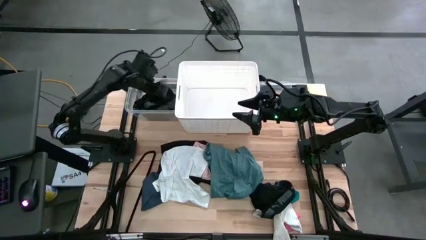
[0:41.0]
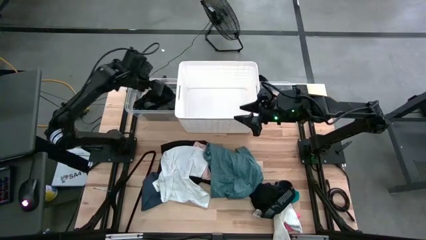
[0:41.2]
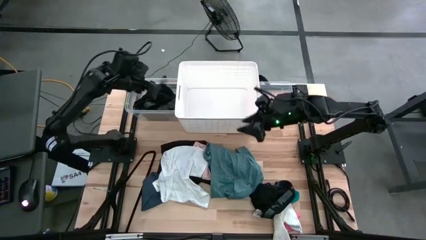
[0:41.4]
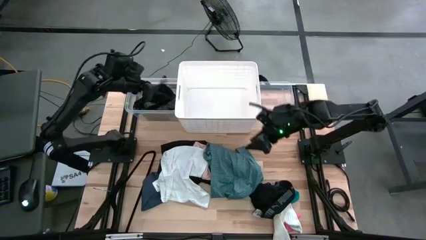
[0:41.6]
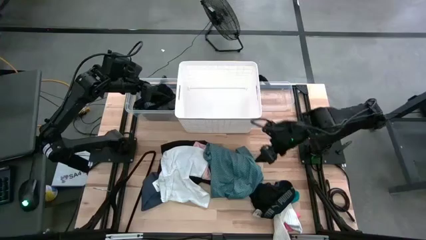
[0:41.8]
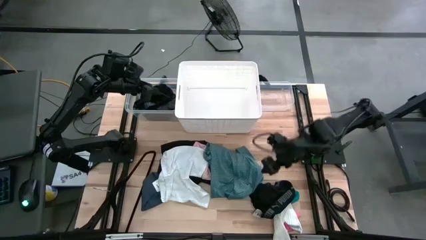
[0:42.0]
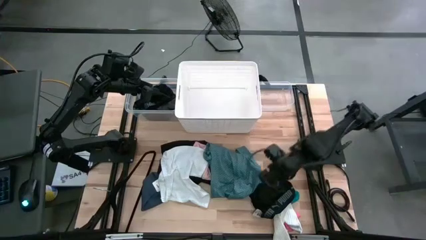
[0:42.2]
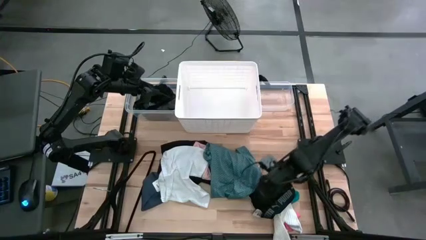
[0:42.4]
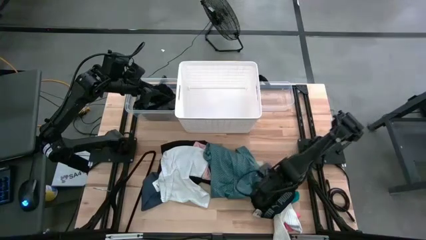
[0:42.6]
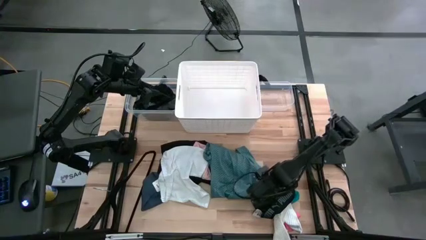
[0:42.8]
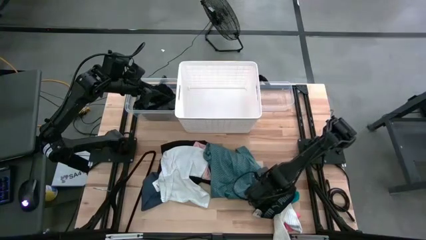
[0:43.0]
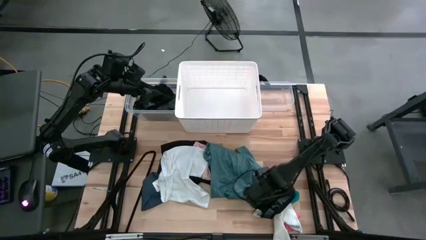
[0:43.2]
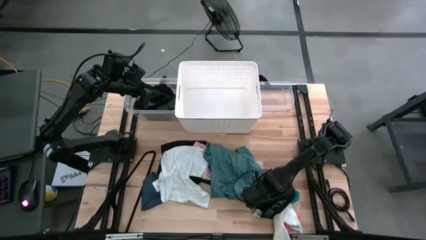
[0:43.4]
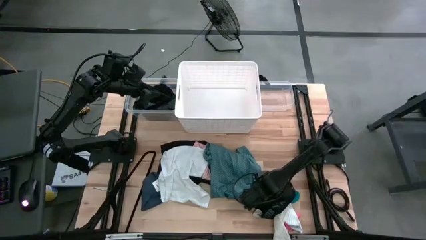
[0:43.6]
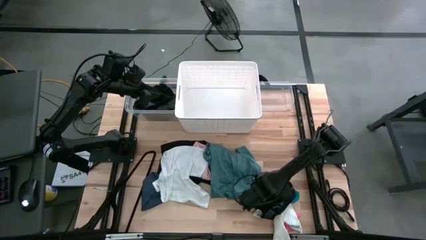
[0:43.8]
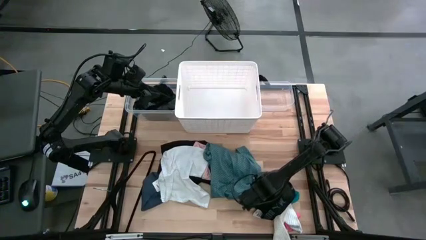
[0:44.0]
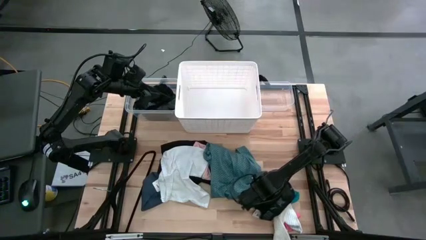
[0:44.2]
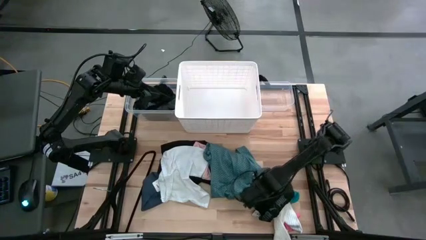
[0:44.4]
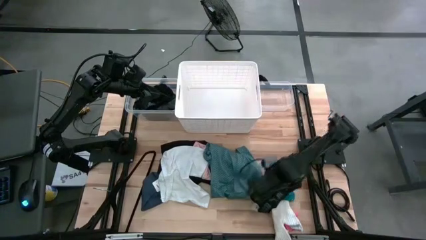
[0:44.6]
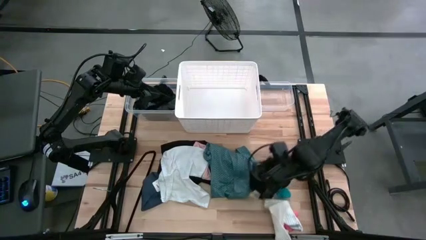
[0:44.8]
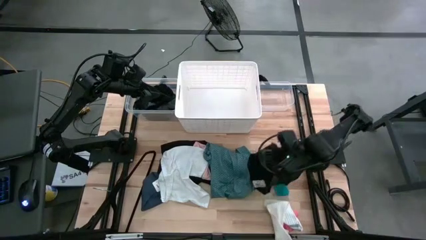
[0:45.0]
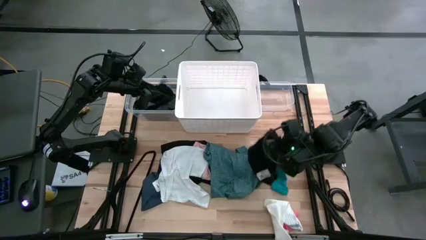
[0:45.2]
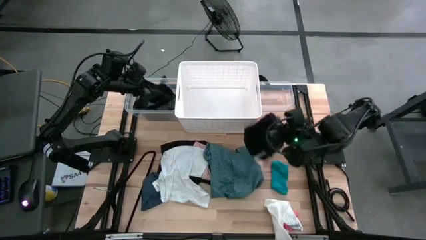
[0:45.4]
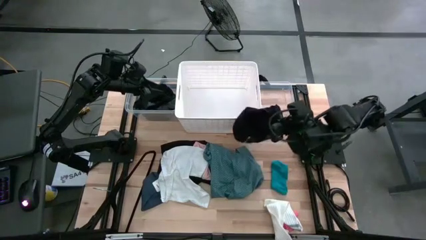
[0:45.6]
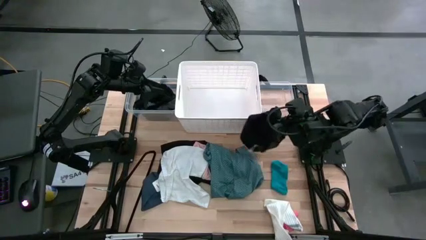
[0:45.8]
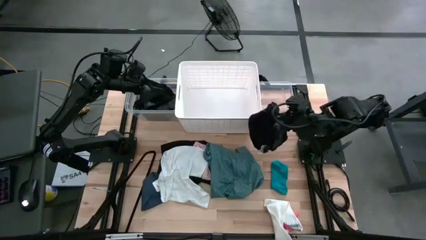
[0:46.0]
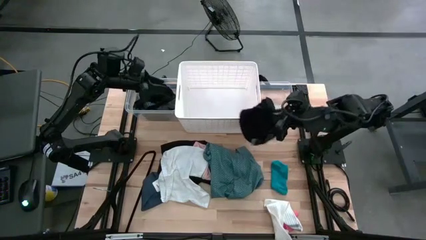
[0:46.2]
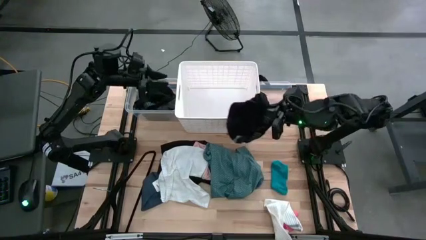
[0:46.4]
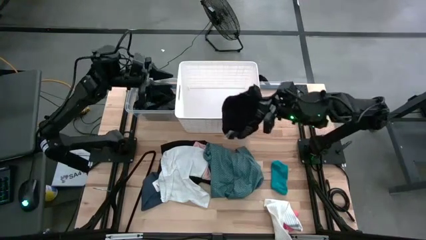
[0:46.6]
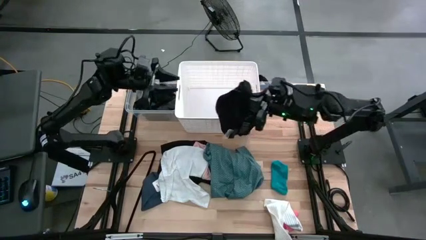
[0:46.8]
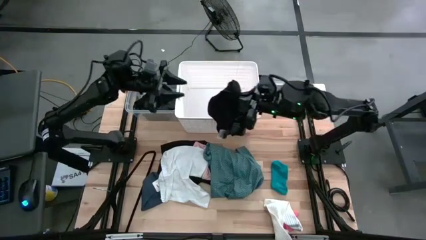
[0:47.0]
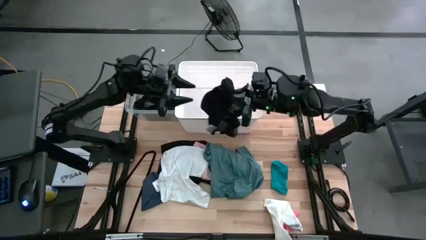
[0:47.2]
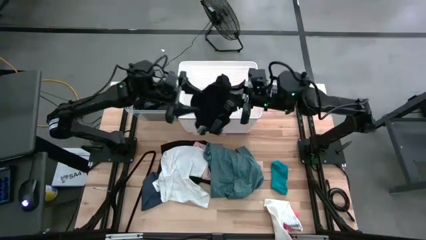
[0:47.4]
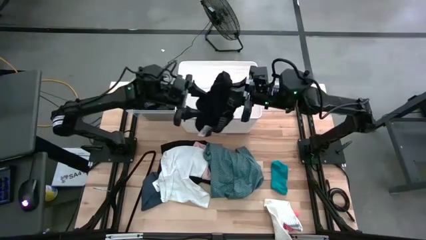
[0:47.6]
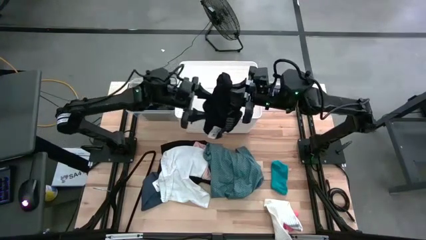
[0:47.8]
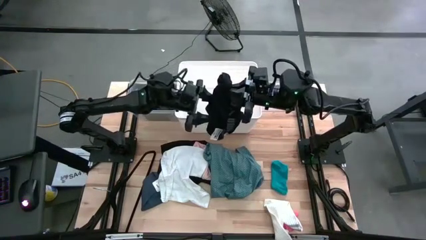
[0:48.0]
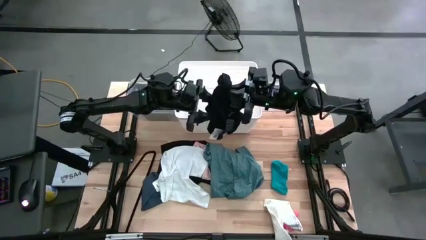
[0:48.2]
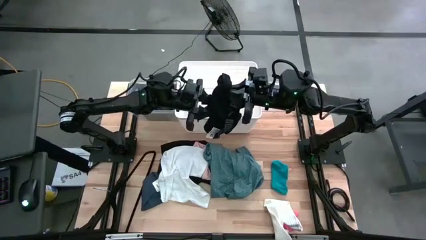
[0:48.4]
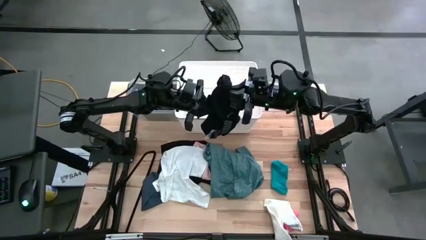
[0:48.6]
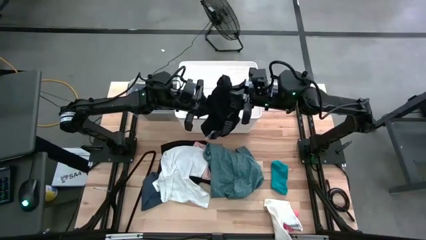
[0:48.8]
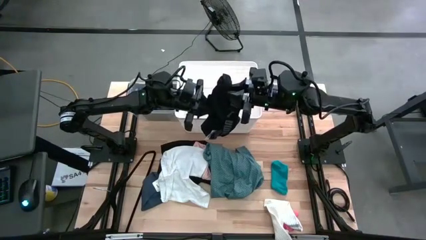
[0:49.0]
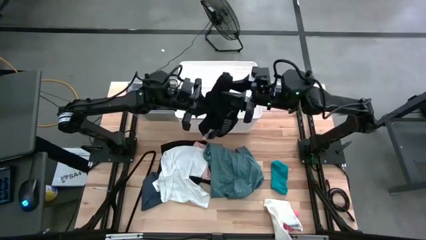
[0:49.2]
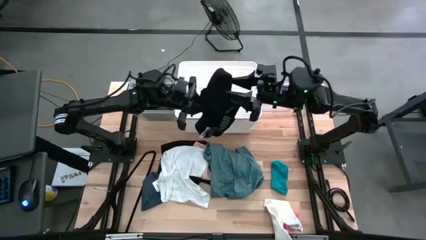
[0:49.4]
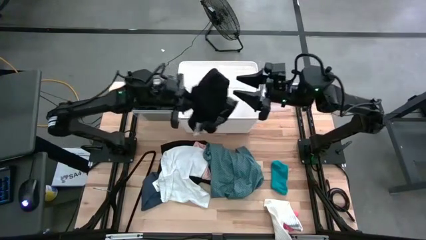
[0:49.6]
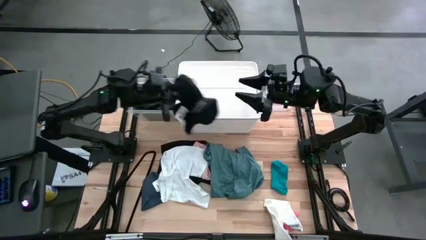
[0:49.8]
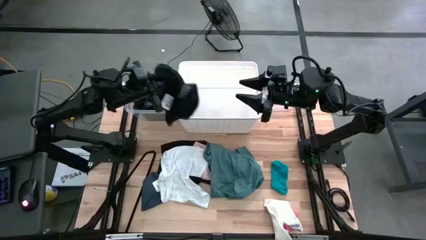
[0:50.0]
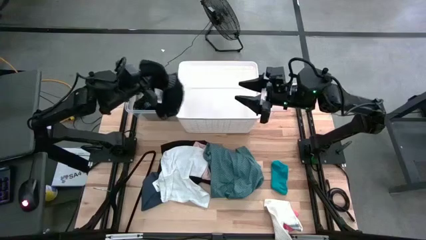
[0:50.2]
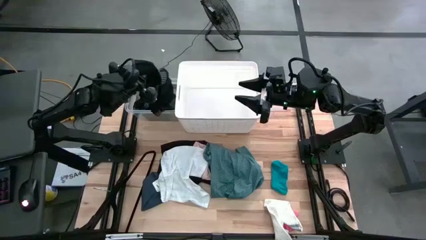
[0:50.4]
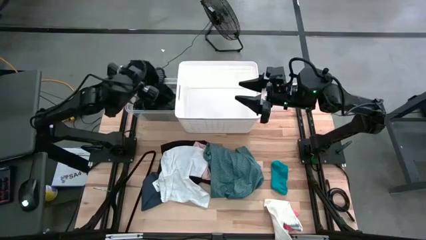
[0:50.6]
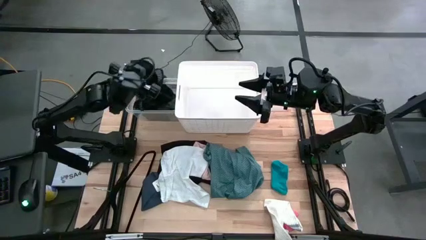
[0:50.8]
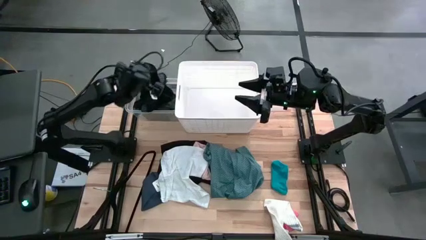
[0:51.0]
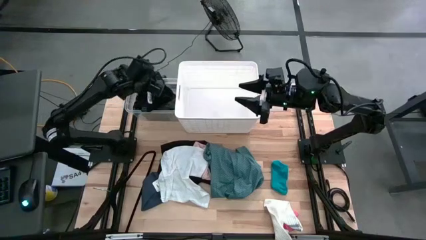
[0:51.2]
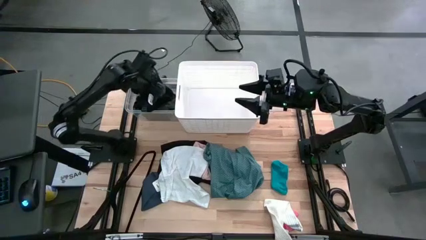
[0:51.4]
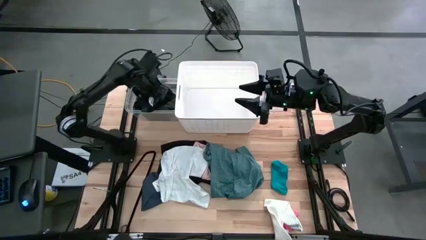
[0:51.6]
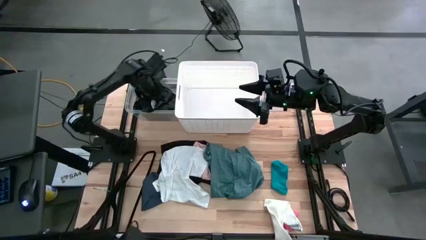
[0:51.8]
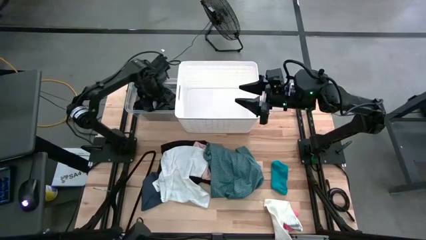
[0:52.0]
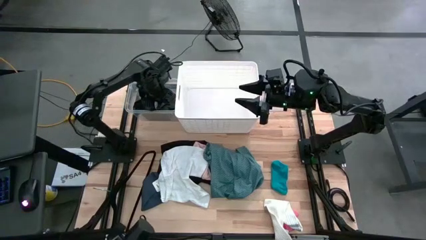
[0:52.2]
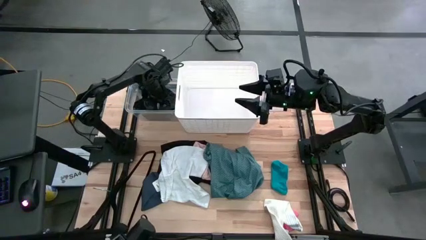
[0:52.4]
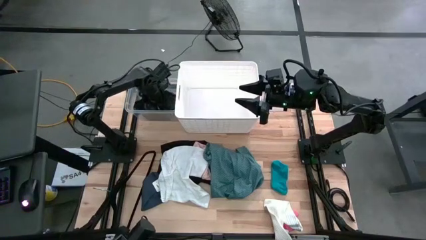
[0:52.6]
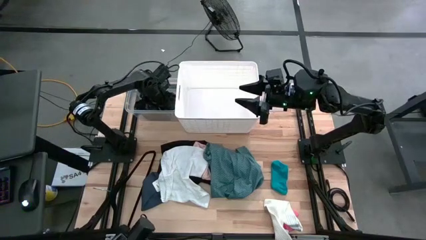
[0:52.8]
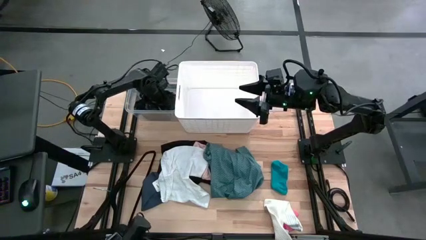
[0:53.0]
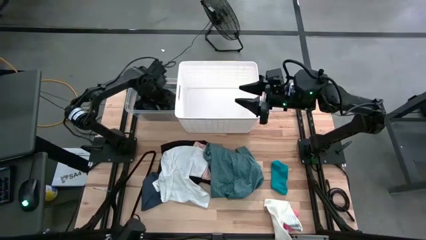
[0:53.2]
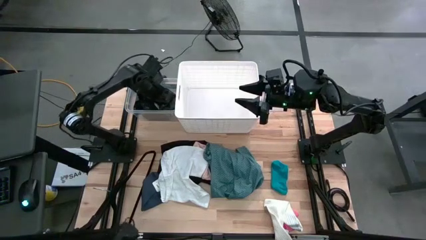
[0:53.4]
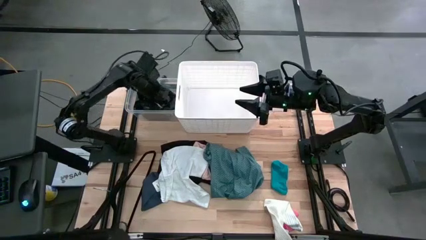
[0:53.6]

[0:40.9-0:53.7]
Task: Pick & Place Cloths
Put the black boxers into the transparent bin

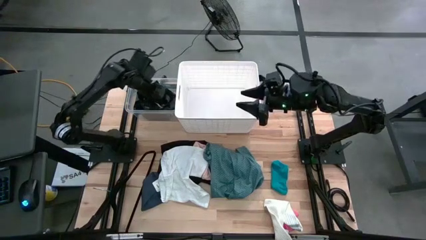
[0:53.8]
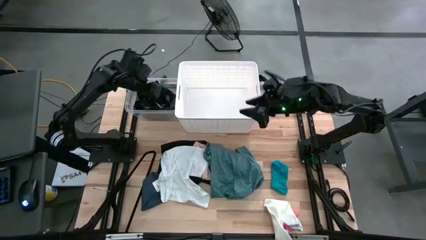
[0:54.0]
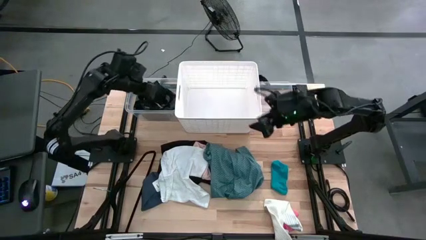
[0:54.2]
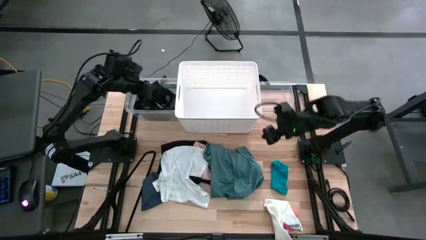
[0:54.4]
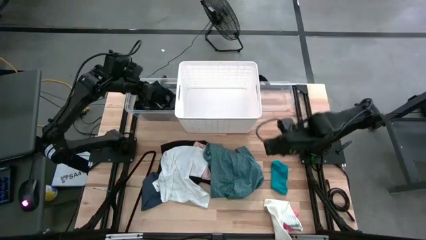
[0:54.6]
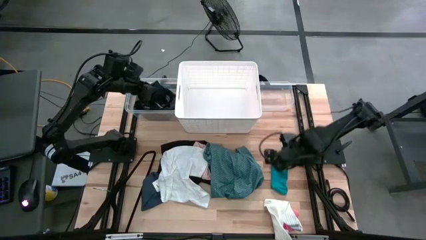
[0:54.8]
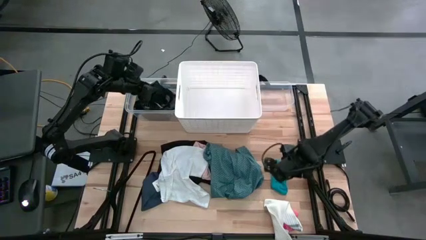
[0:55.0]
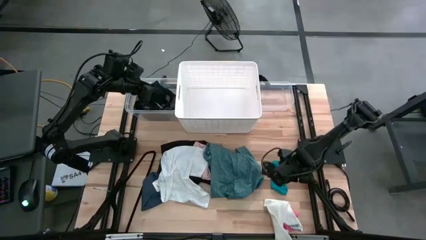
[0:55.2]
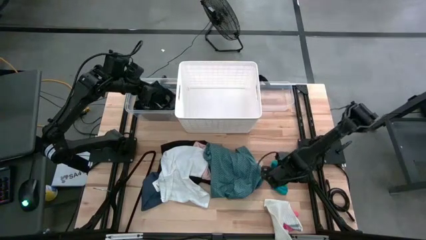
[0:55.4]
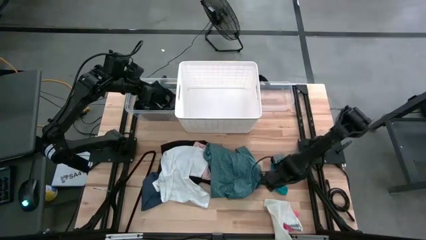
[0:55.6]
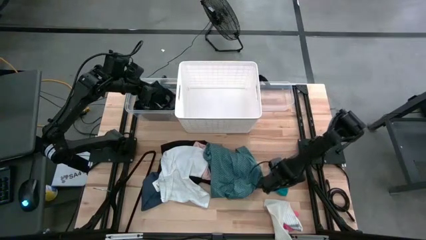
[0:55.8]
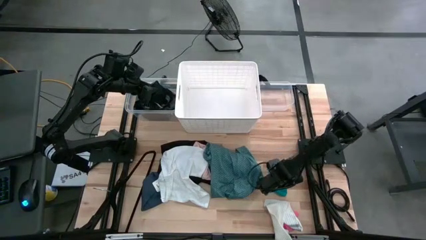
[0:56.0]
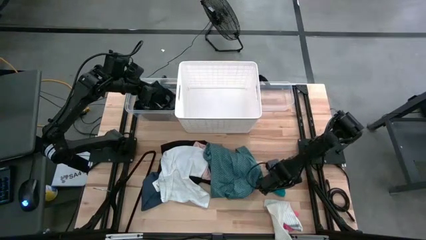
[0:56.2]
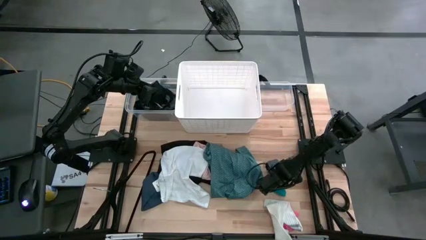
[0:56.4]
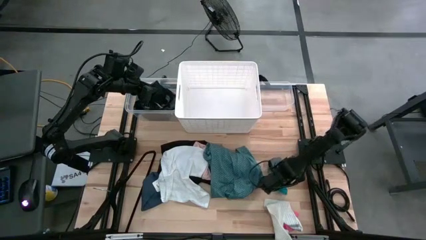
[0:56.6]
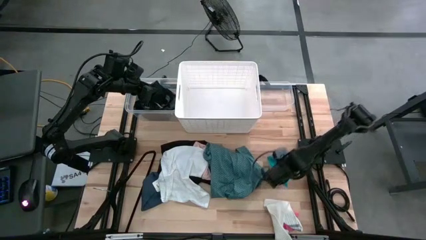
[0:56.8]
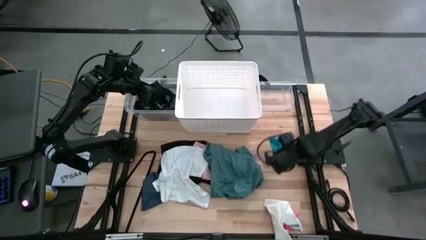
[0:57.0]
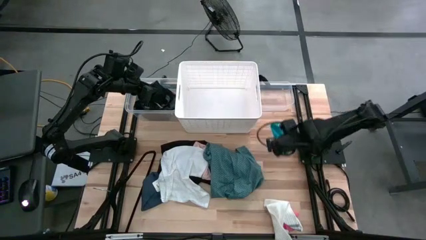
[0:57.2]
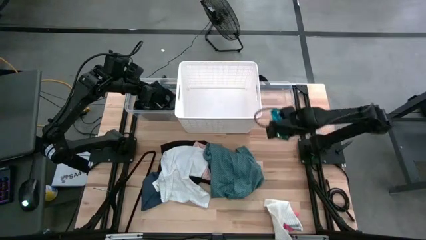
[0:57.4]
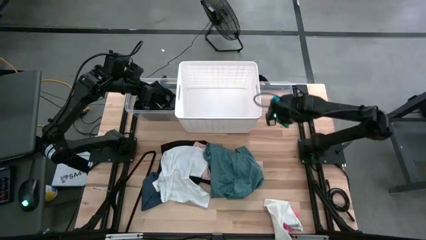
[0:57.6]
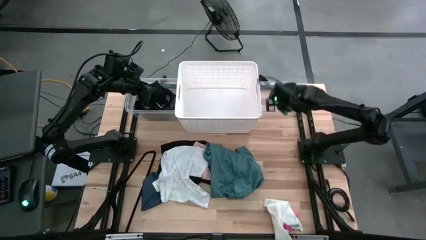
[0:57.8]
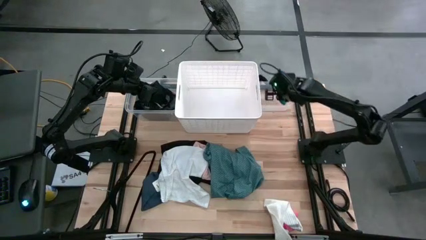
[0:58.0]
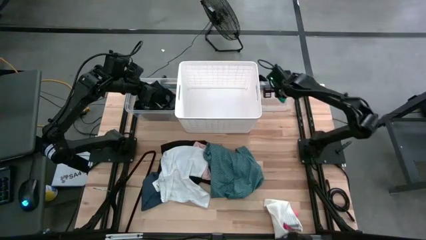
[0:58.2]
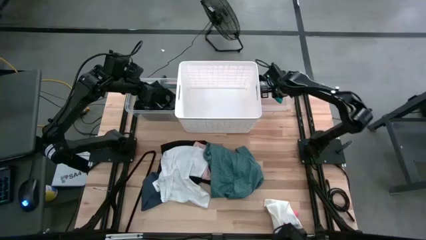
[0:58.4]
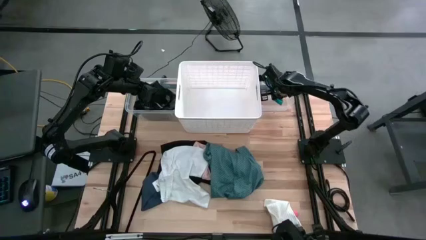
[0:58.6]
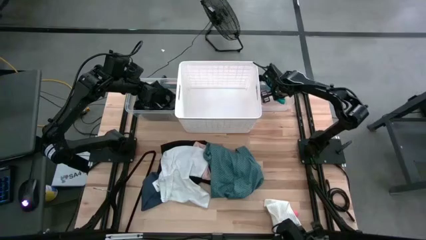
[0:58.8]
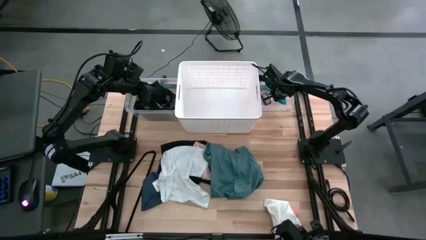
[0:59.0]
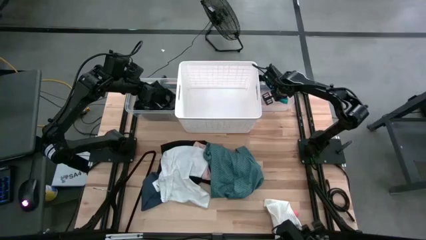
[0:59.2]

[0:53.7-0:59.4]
Put the light blue sock into the right transparent bin
